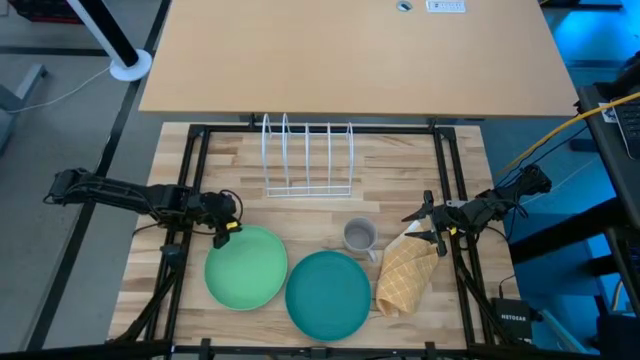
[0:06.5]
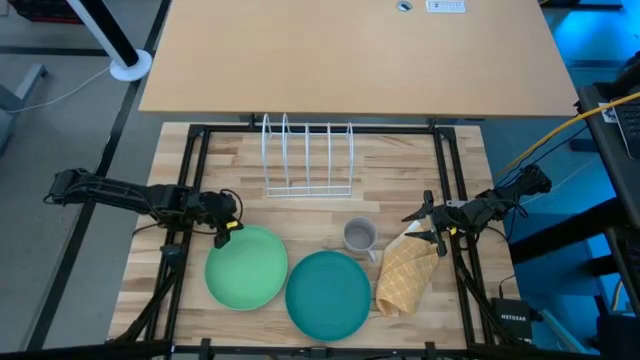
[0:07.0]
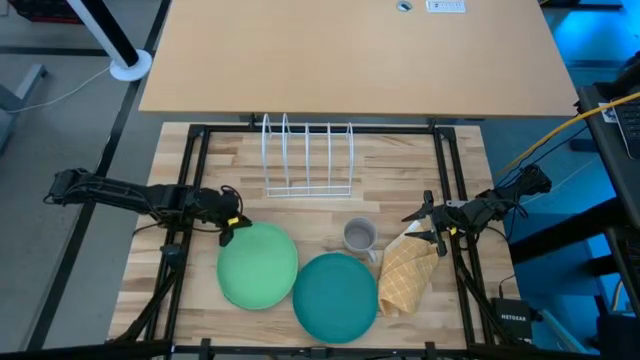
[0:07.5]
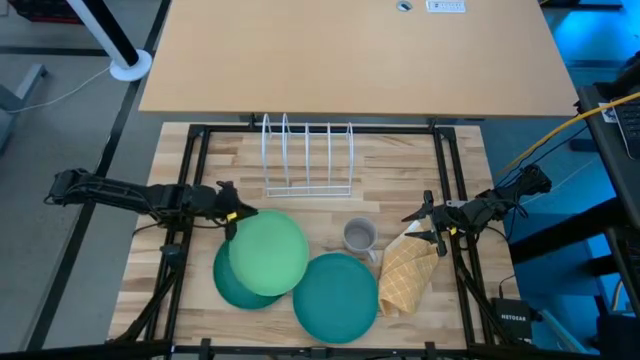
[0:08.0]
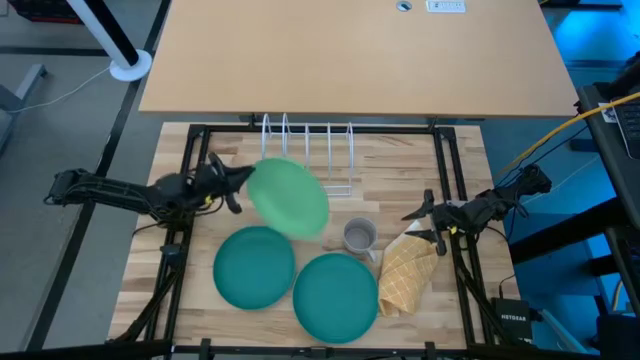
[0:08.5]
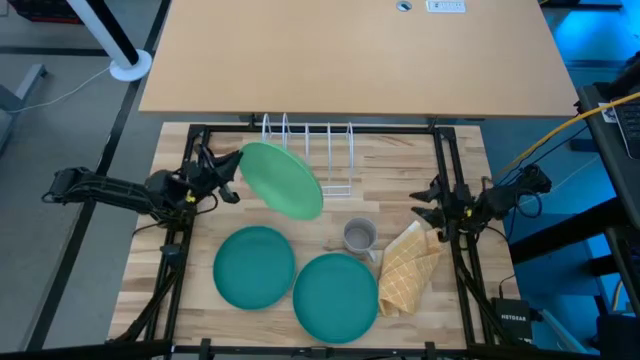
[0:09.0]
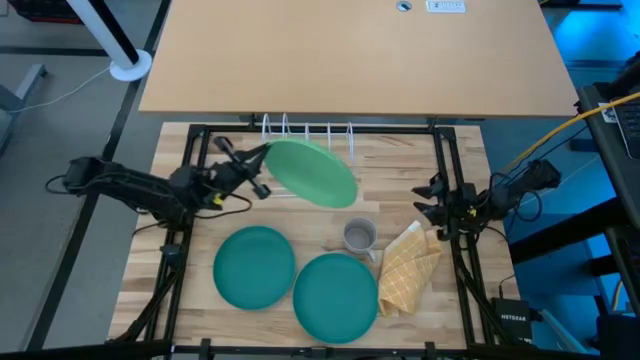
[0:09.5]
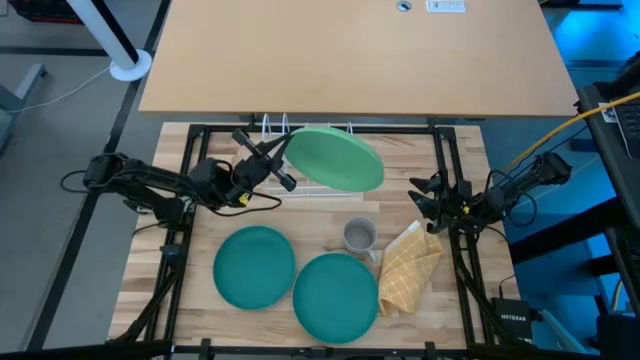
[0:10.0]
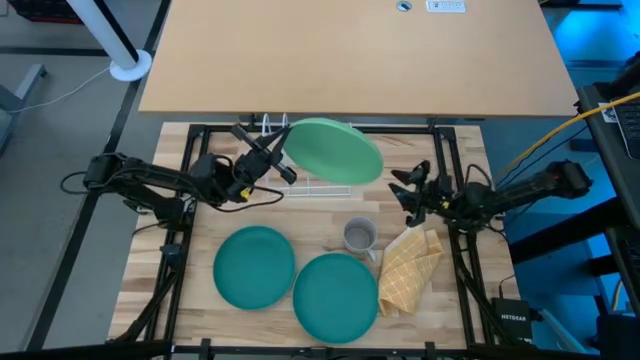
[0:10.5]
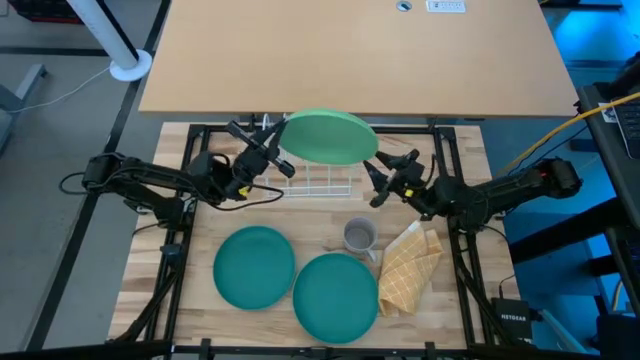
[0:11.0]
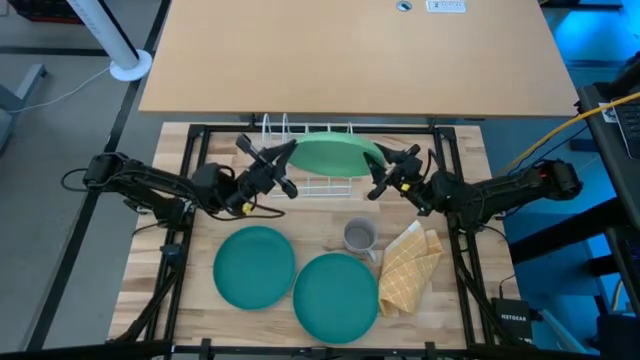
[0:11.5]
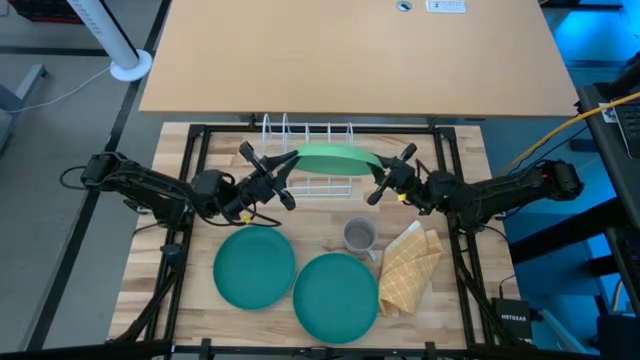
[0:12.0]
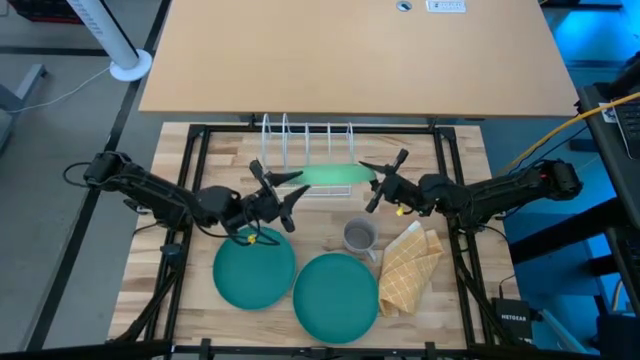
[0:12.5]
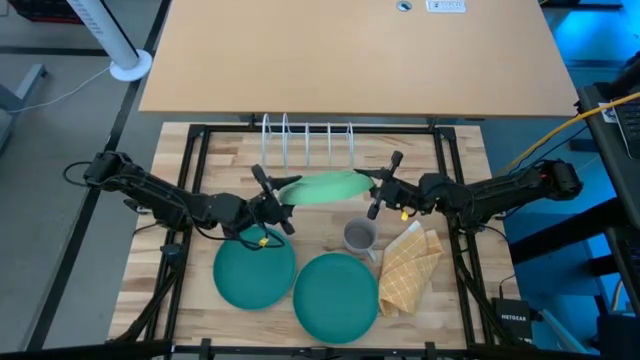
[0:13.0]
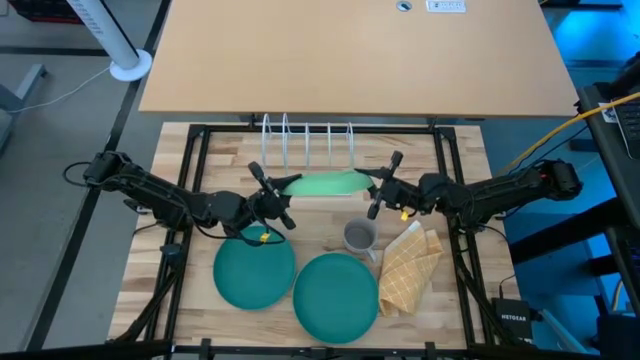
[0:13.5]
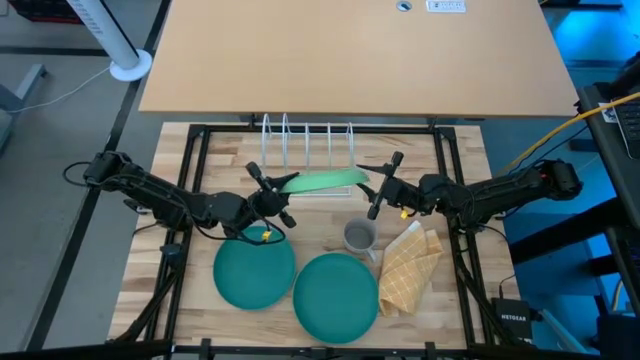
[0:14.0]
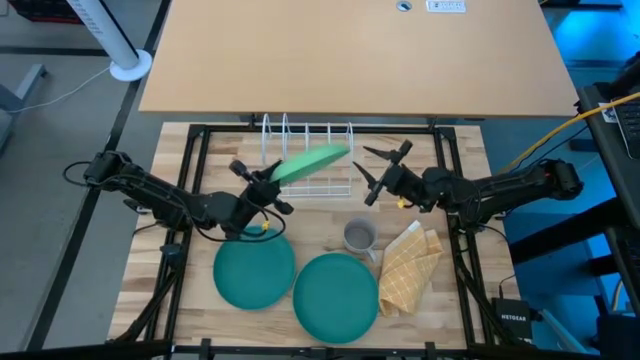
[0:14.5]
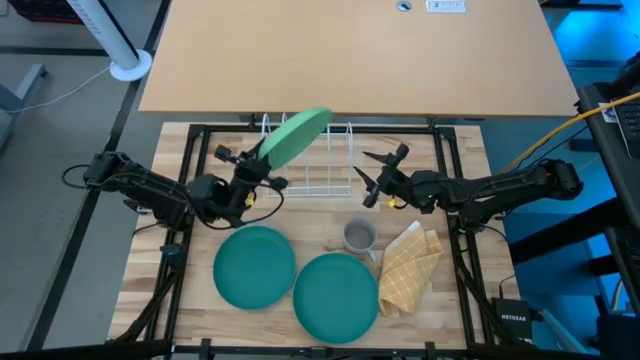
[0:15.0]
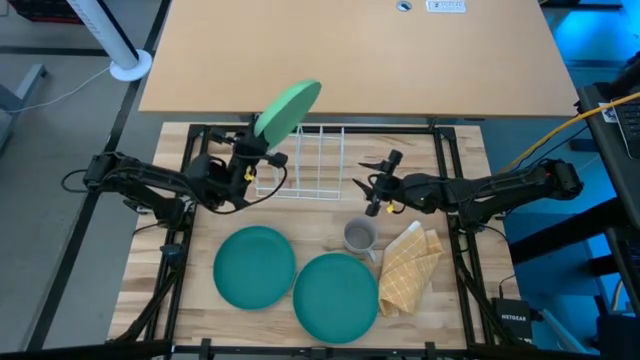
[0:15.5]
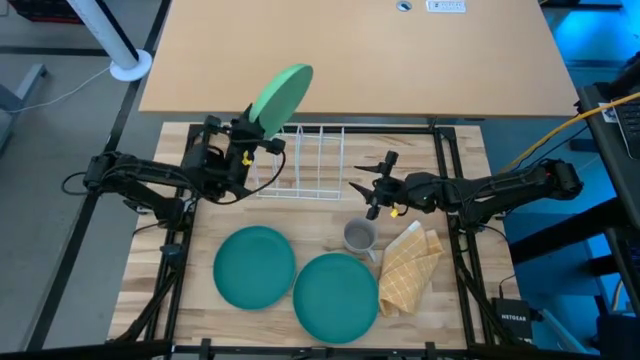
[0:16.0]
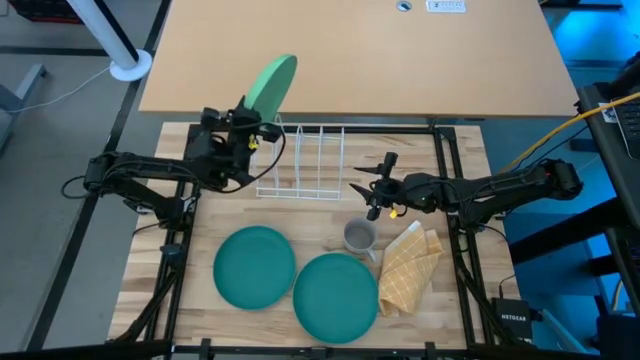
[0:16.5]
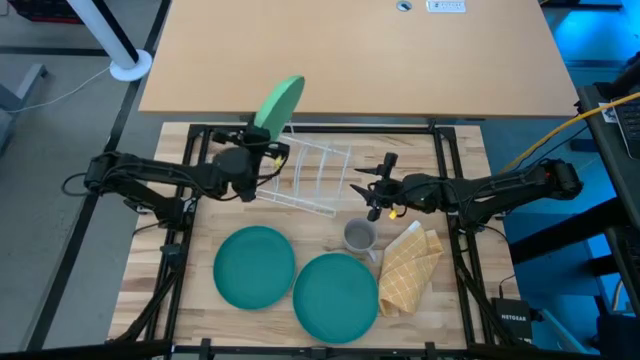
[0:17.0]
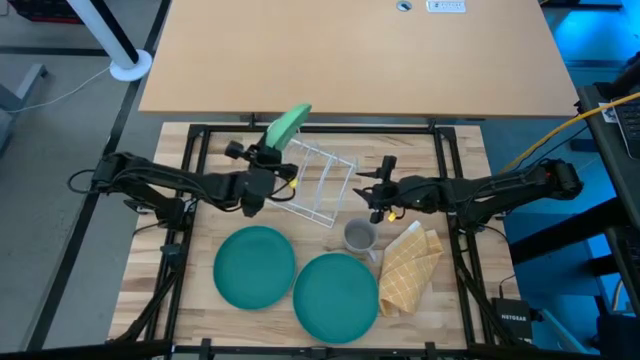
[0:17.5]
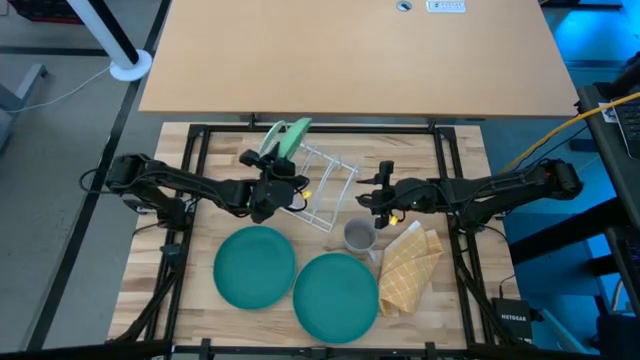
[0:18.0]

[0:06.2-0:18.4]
Task: Sort dishes
Put the left green plate into the white dish rack

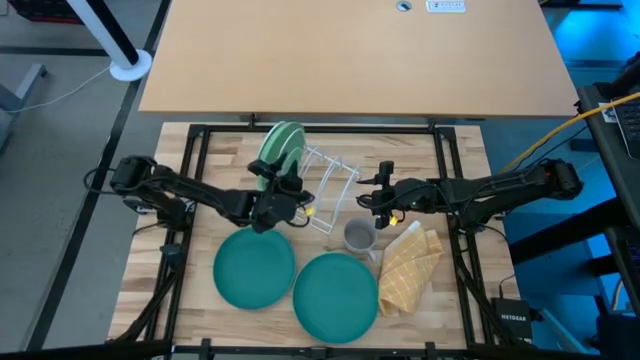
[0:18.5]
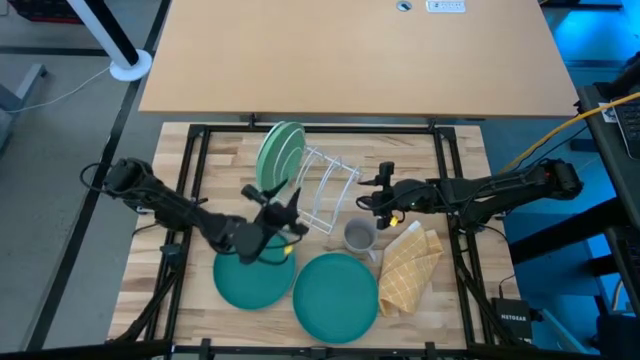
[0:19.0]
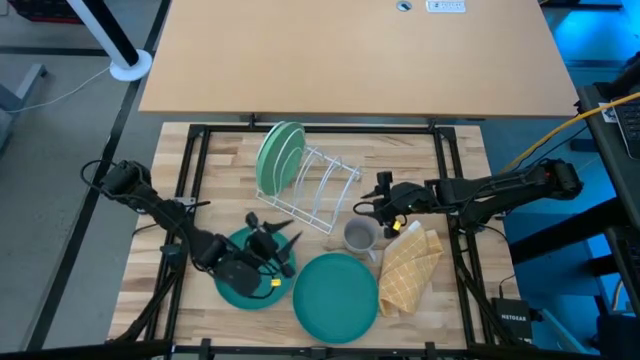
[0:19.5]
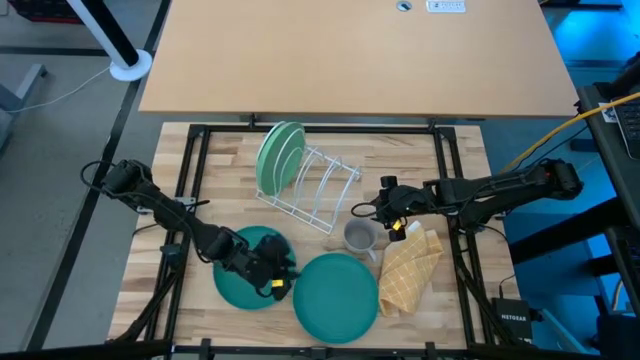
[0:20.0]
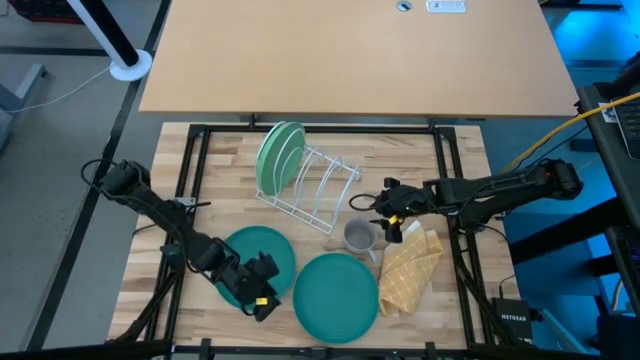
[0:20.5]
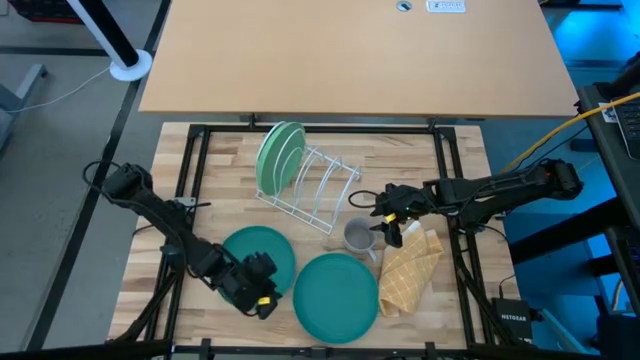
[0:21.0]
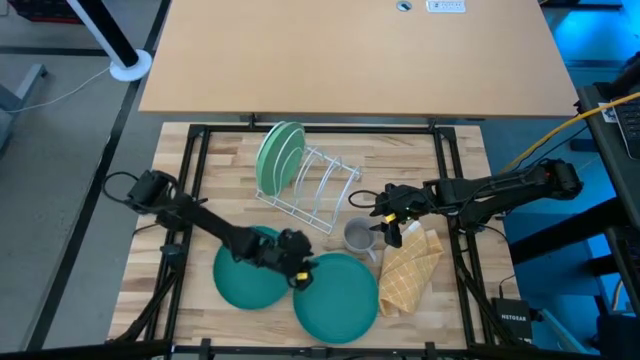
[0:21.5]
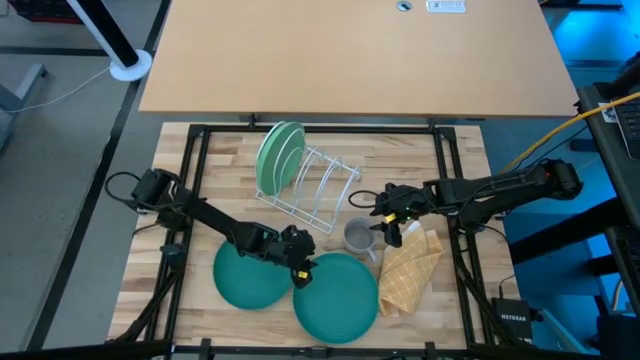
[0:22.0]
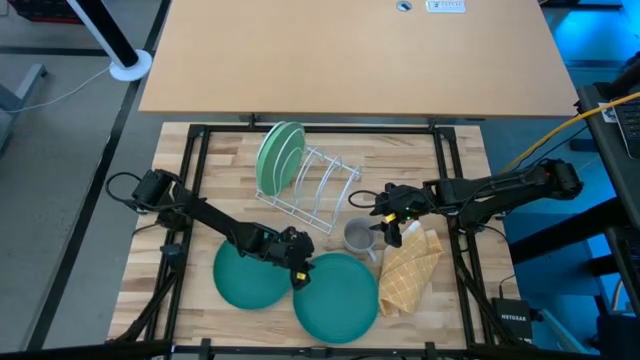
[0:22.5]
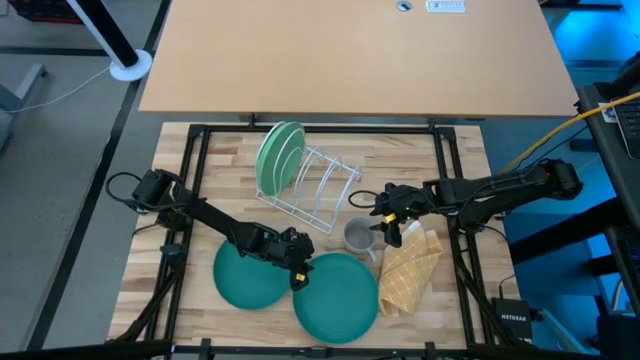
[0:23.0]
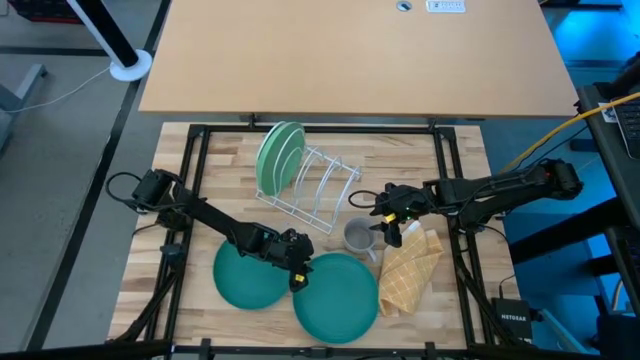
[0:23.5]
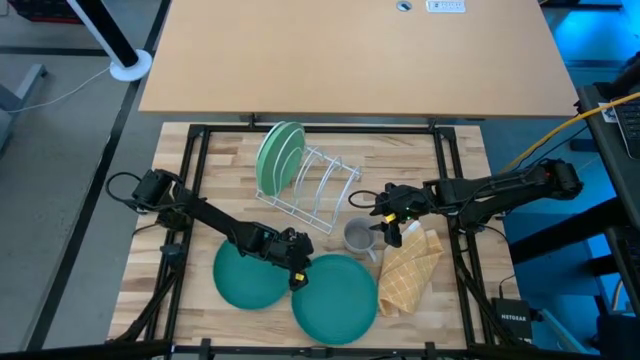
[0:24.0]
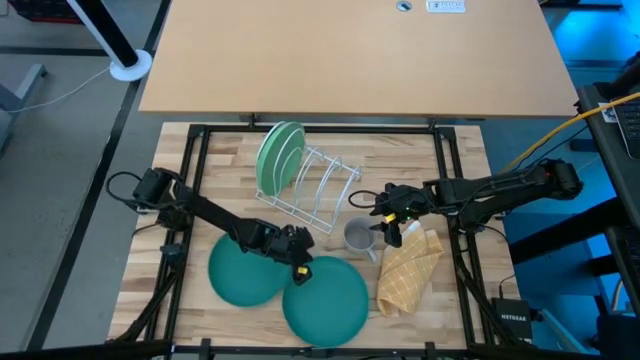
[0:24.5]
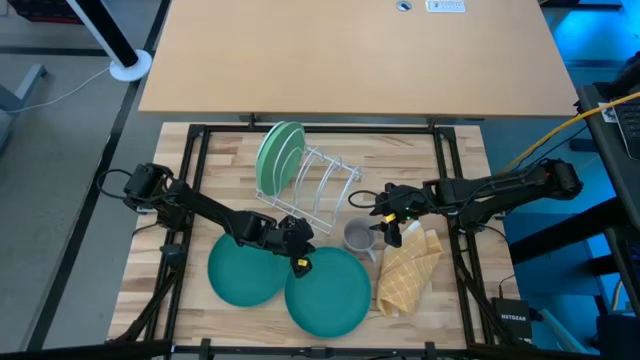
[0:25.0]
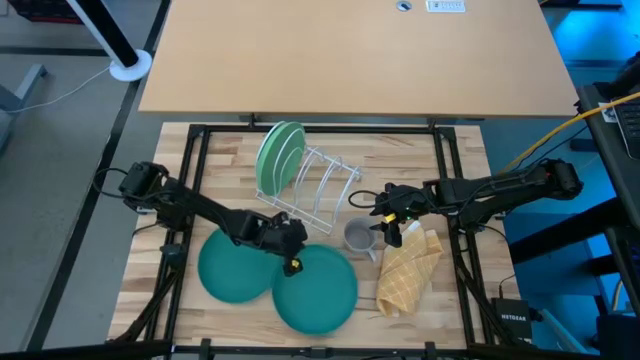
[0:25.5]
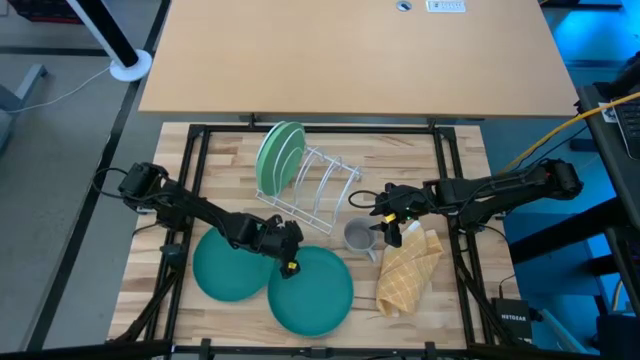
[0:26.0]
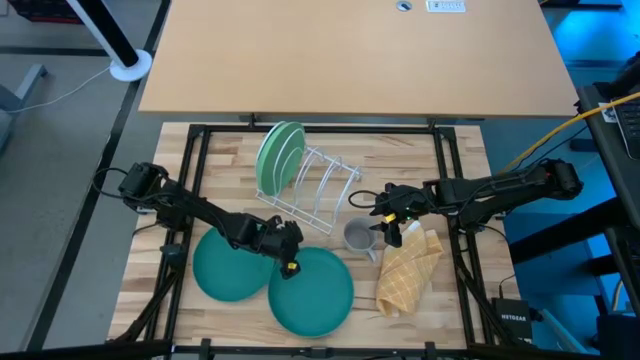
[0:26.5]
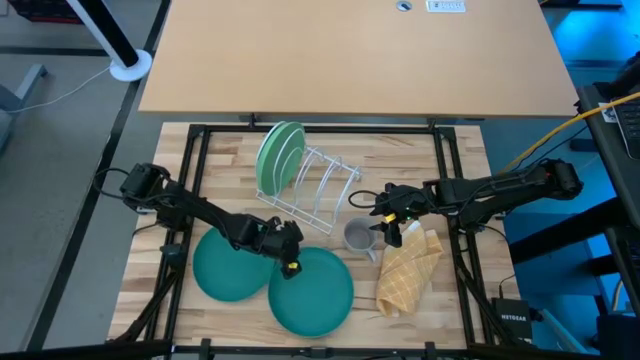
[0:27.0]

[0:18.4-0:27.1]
Put the right blue plate into the white dish rack
